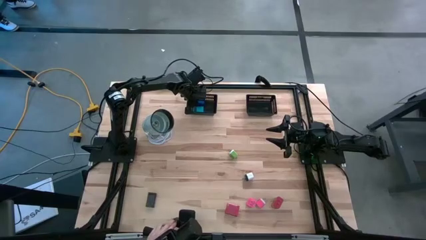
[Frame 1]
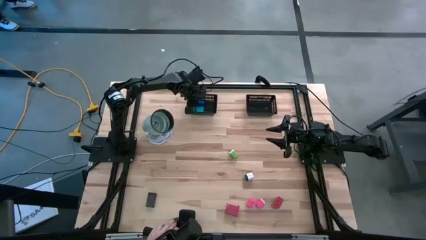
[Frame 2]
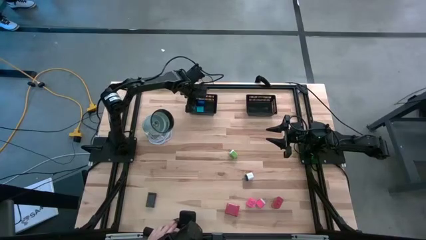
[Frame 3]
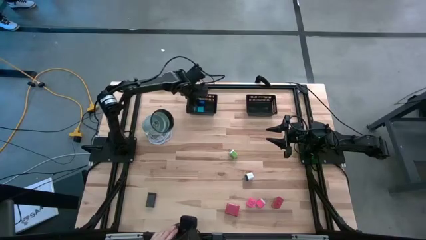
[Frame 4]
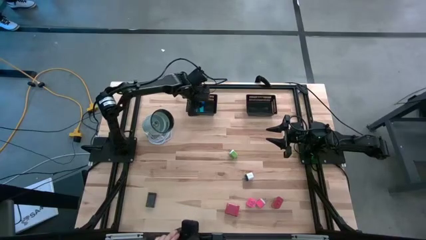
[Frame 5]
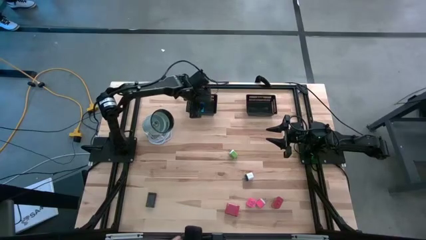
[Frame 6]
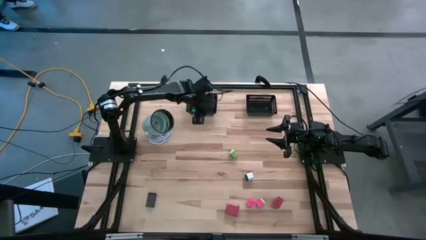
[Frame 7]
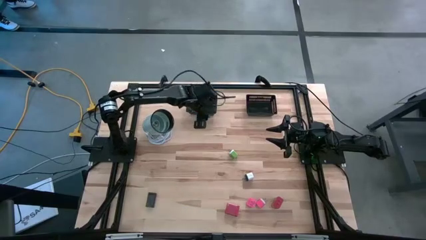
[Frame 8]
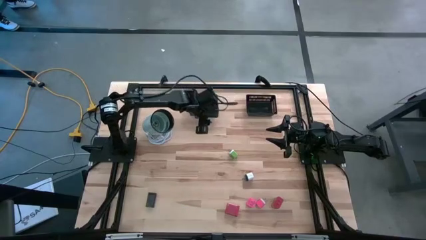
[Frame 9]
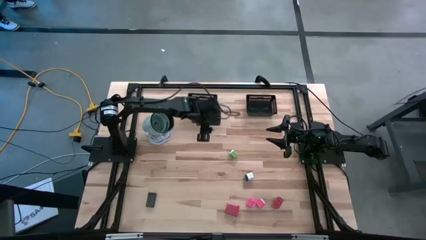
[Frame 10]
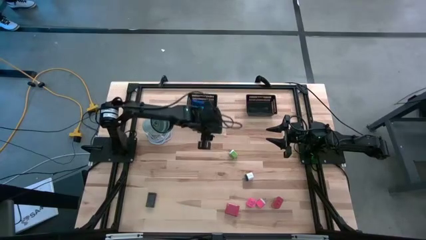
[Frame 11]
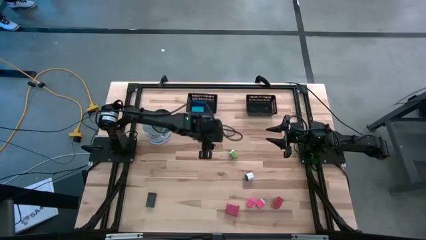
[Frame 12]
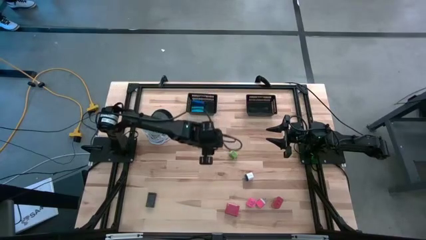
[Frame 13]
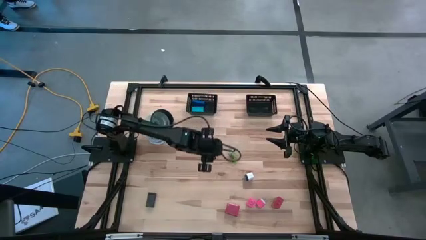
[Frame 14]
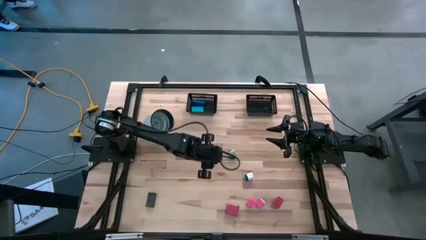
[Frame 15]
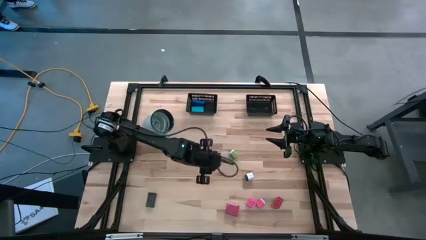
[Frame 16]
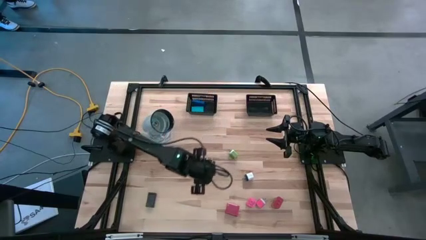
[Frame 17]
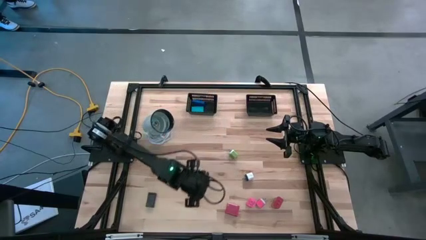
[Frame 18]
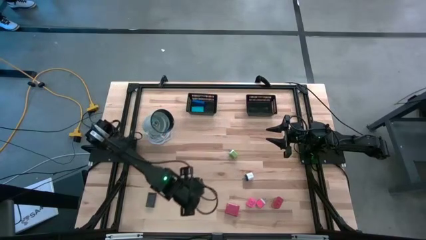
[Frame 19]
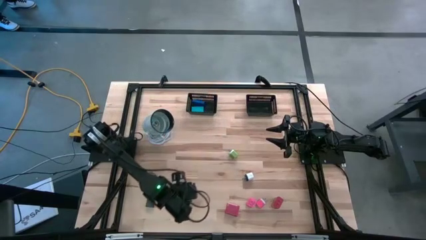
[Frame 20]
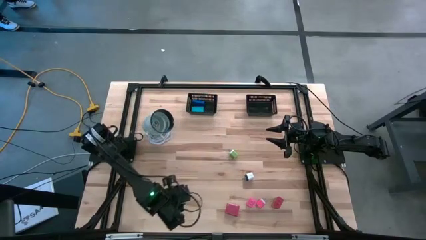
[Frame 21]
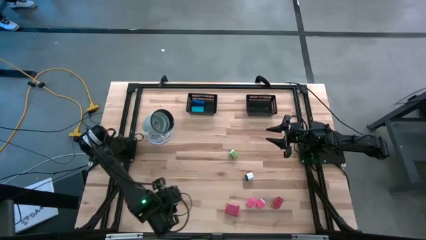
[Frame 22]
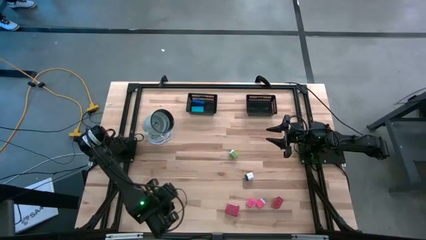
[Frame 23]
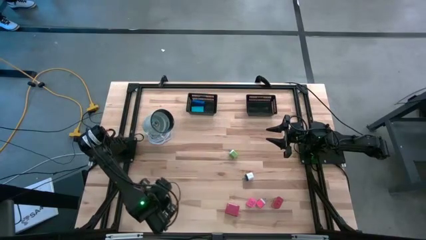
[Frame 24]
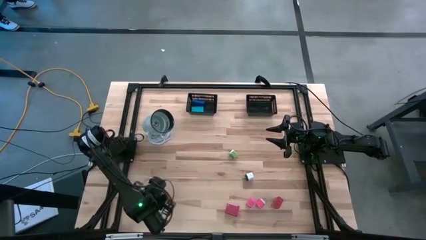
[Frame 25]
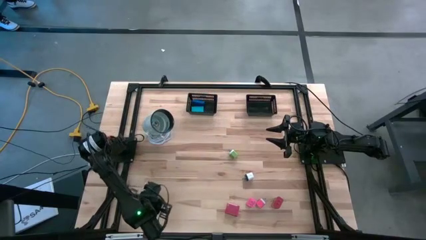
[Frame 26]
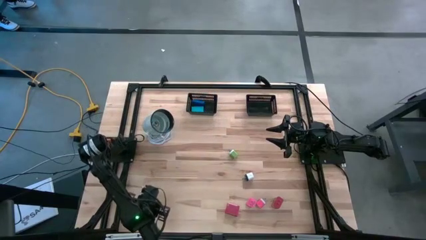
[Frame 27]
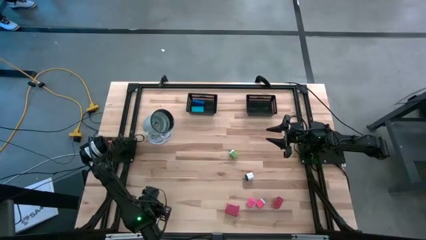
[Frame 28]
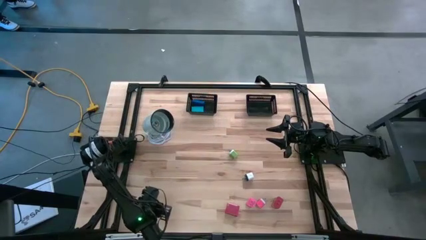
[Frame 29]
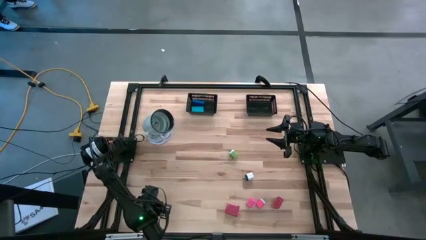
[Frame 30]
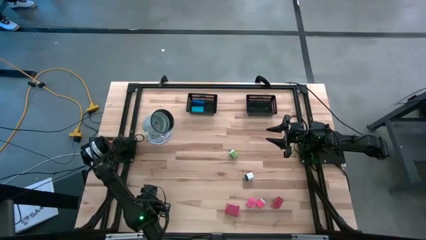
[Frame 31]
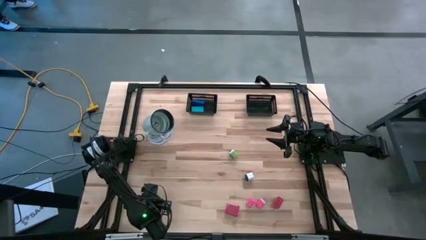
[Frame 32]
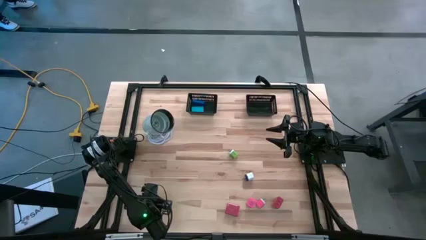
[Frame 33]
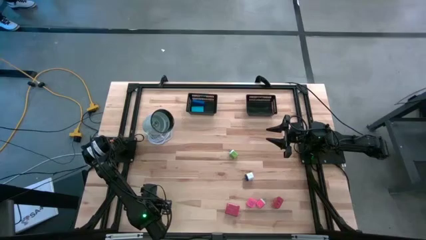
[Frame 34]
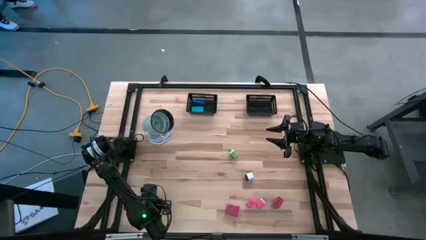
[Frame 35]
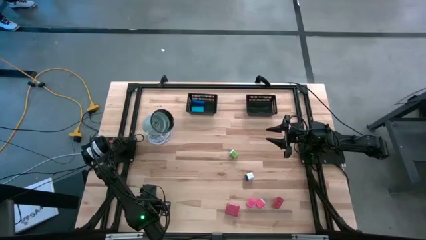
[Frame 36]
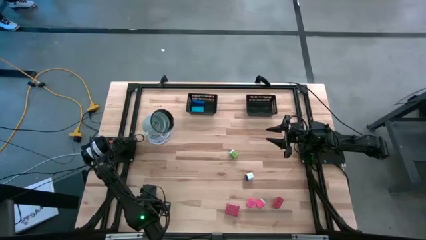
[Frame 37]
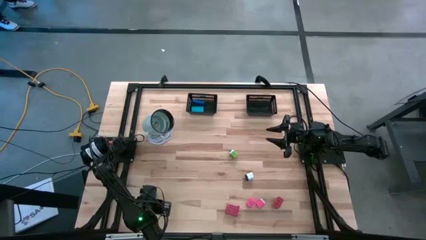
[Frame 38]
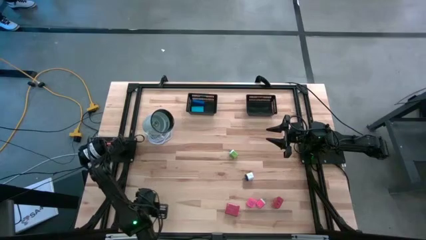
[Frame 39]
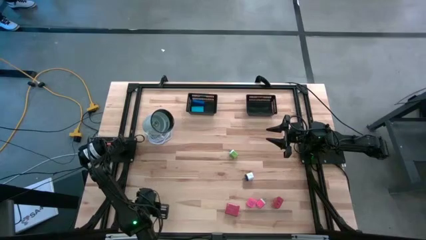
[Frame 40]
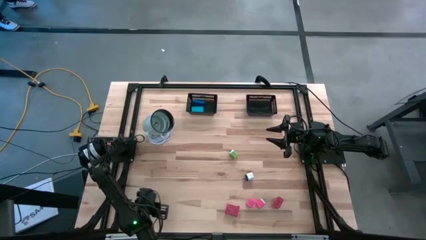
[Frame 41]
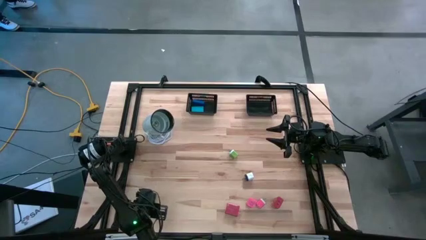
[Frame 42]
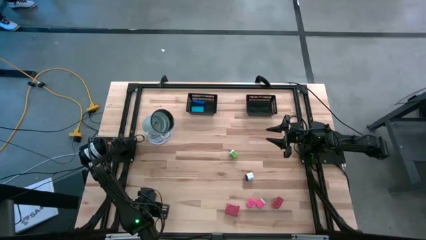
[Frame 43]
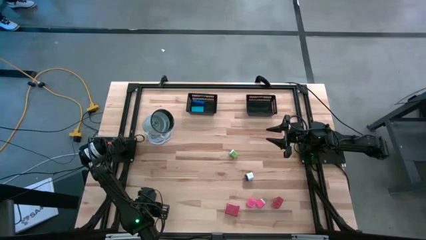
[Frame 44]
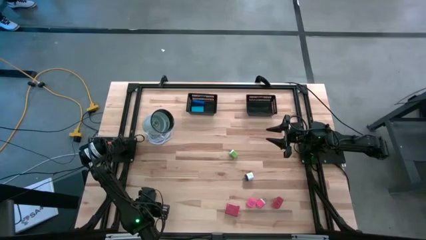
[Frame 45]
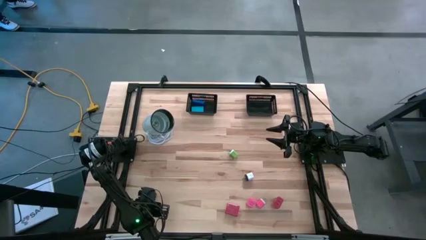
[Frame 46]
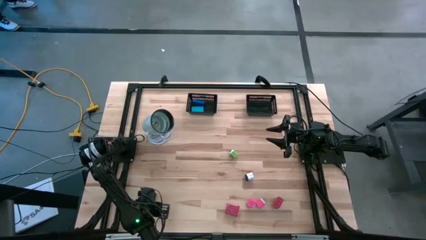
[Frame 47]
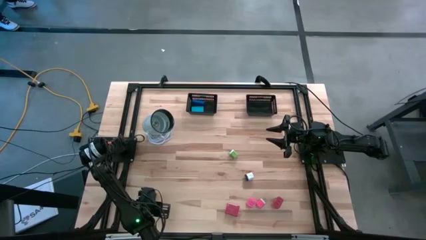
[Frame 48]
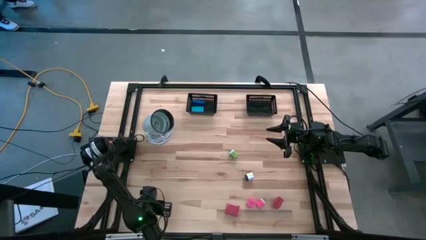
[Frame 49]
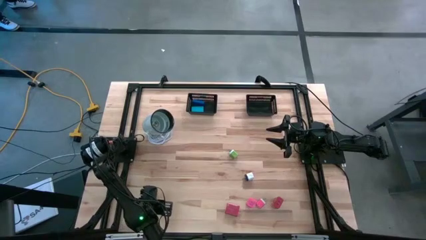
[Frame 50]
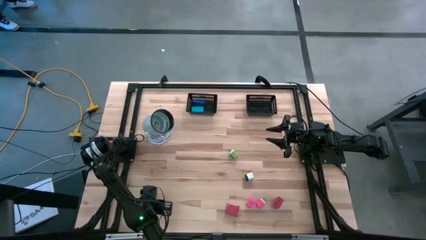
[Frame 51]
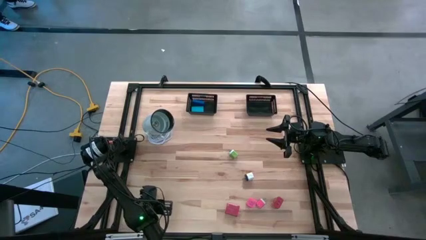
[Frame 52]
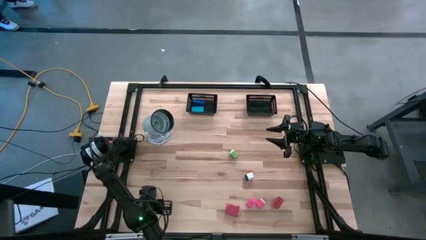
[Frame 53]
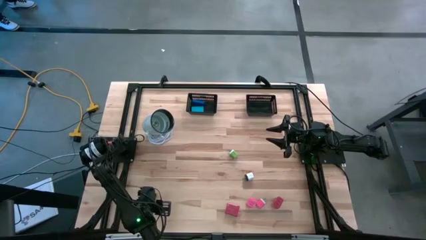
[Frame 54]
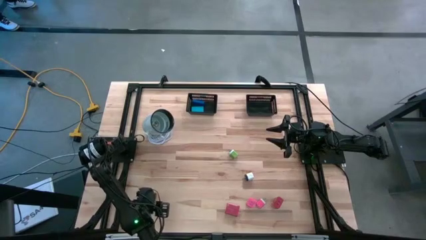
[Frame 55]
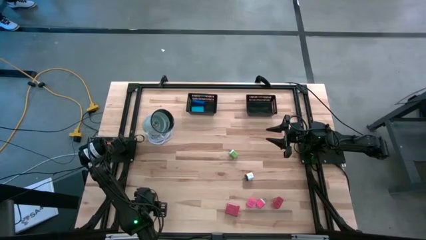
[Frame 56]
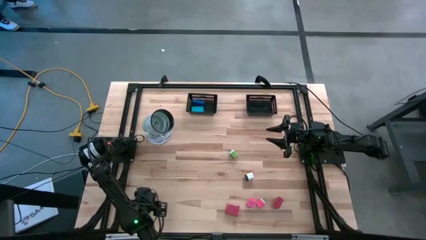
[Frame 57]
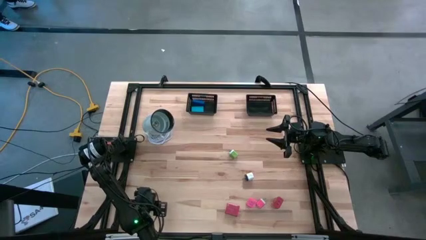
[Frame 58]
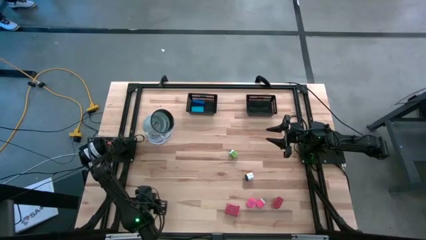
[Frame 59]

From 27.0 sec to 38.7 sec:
Task: Pick & Place Office items
Put the black digital clock into the left black bin

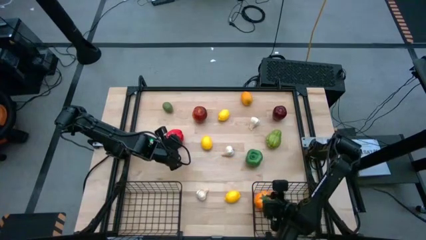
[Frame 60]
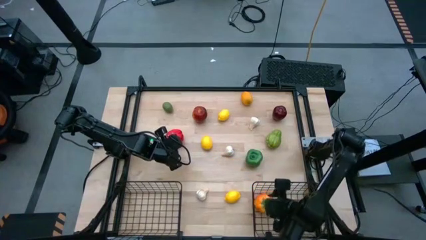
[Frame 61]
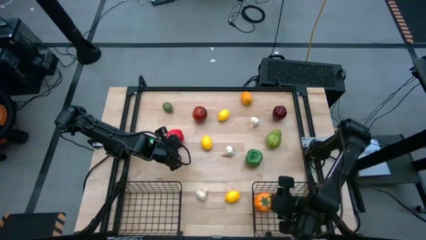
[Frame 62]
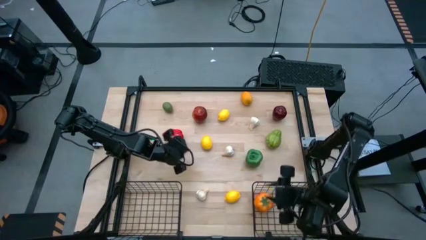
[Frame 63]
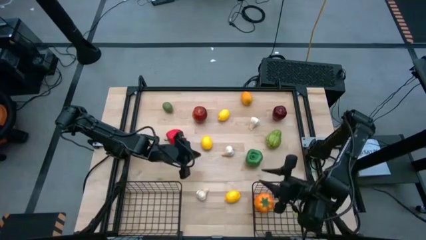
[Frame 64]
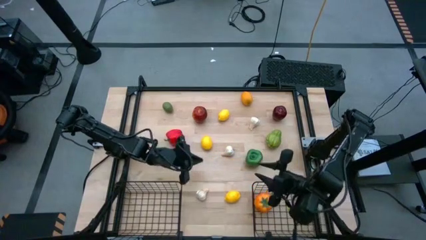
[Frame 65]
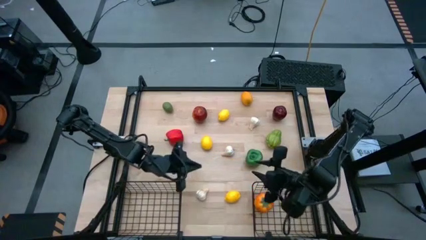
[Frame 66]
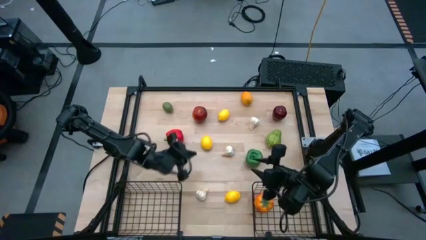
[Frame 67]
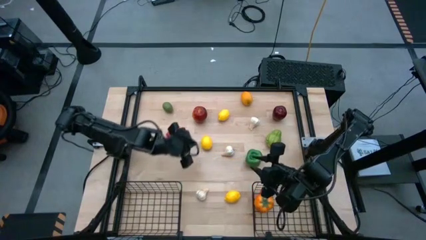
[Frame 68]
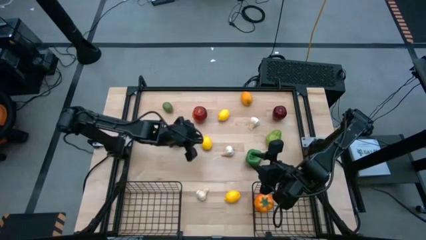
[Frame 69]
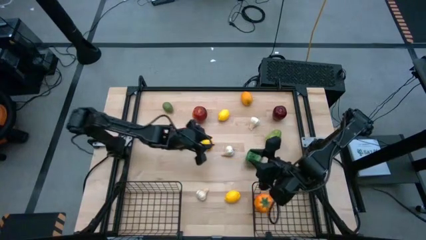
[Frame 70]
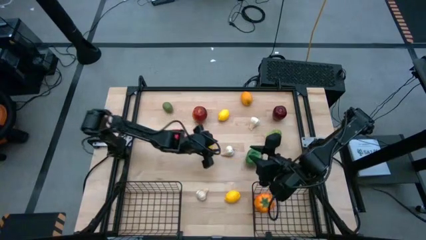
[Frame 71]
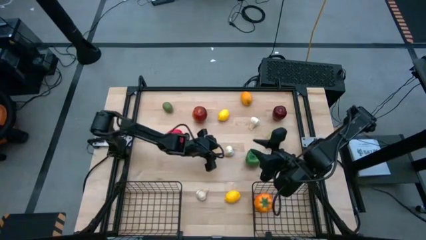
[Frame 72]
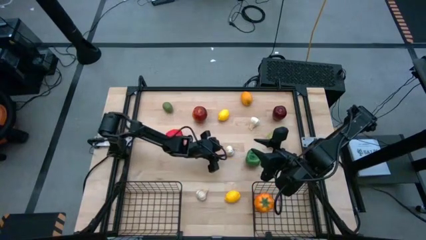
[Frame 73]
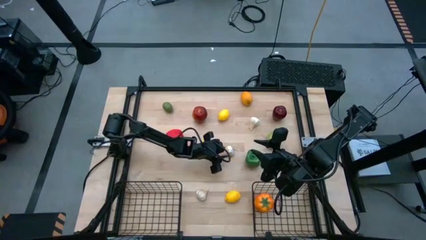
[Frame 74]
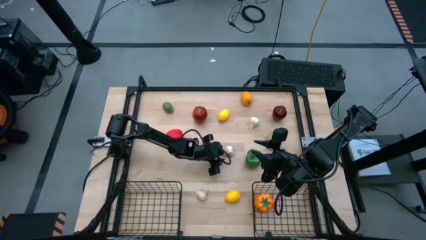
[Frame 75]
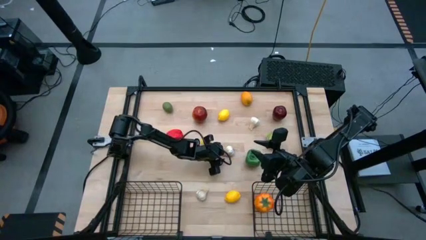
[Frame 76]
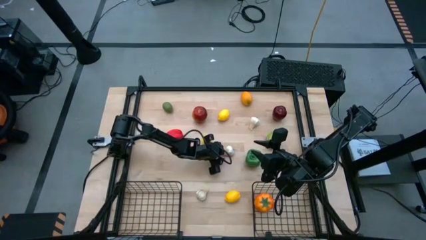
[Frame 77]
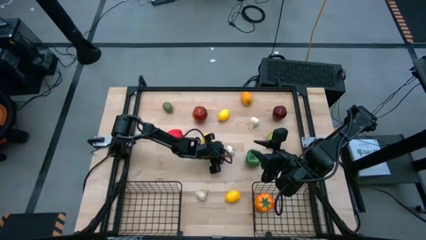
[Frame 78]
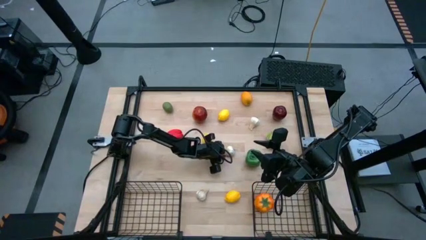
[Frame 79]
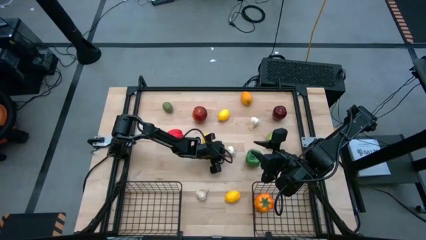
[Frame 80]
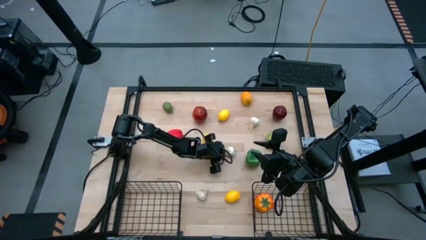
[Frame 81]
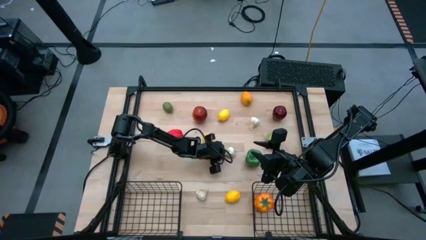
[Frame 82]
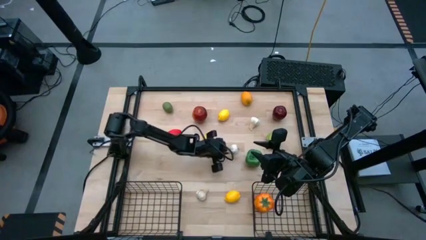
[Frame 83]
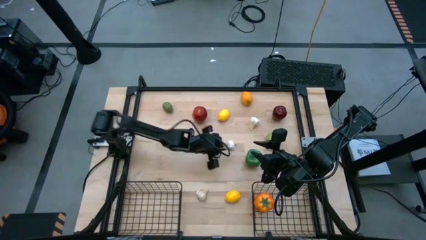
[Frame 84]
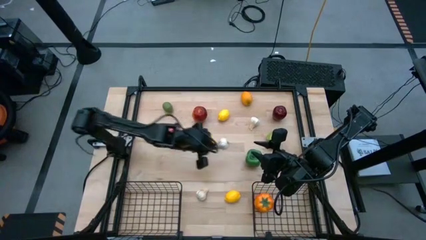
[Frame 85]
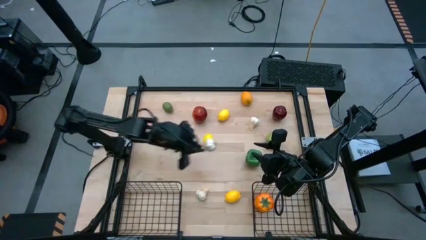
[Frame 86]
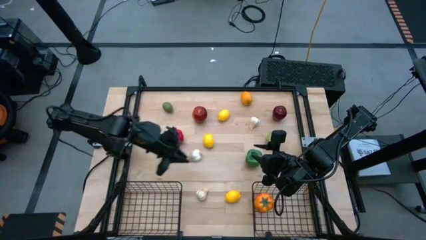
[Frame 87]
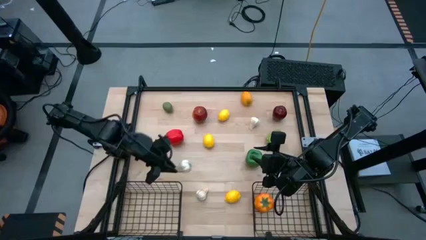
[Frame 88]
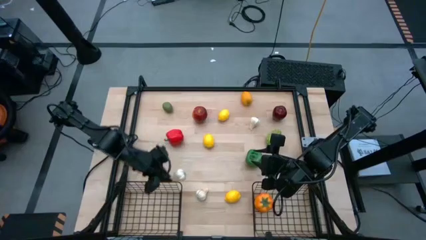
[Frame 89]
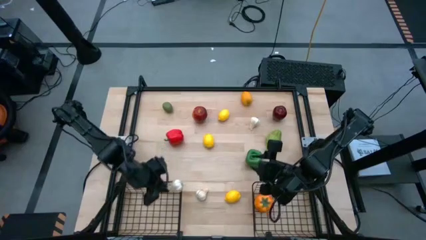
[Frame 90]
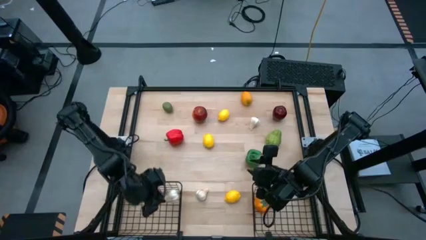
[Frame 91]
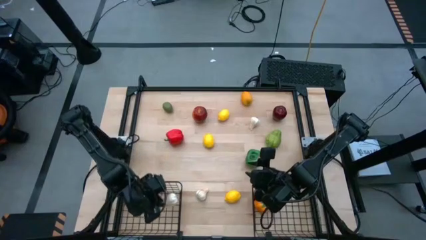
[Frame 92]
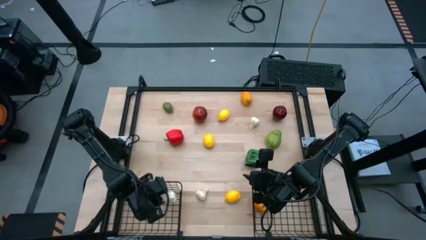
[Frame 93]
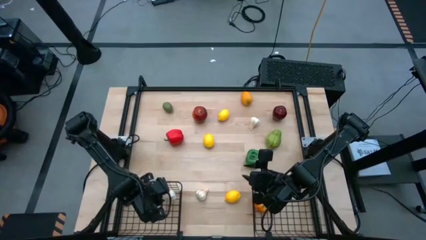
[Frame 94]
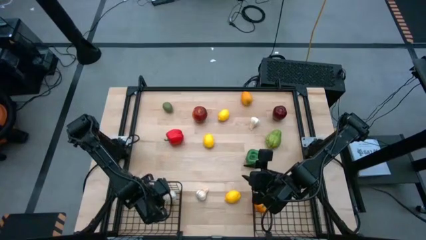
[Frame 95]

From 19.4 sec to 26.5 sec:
Task: Sort produce into baskets
Put the center white garlic into the left black basket
